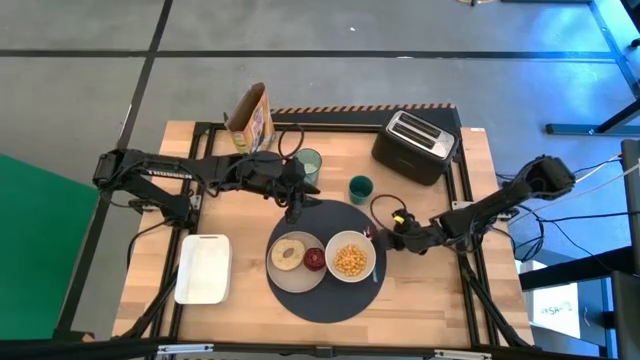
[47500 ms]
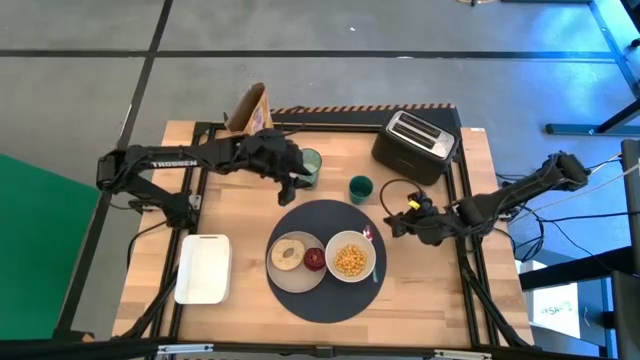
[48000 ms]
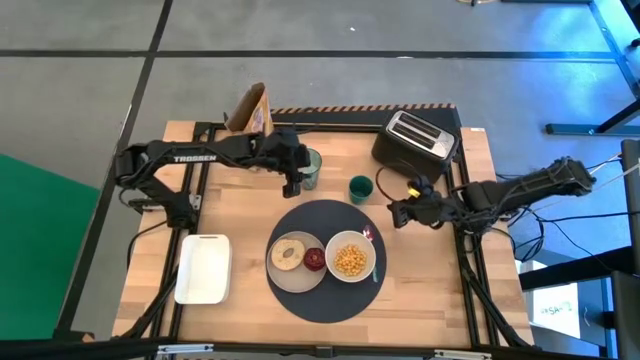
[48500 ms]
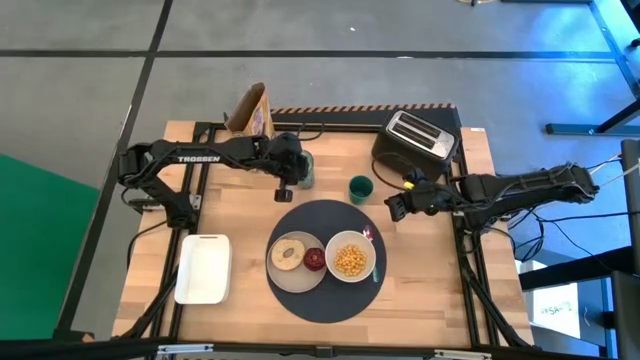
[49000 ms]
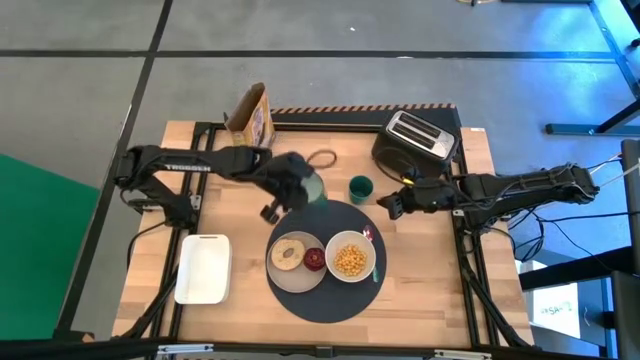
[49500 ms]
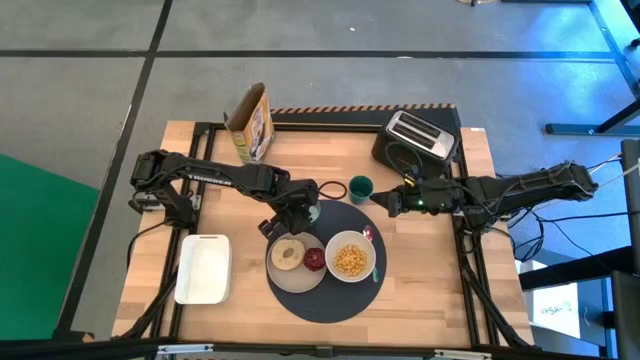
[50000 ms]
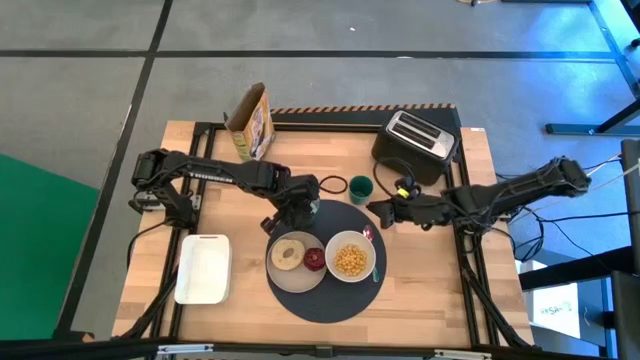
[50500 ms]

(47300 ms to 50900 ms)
Task: Arrange a breakfast setting
Put the blue cup on the top left of the table mat

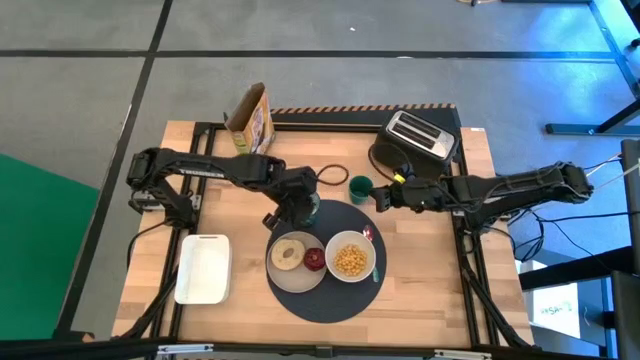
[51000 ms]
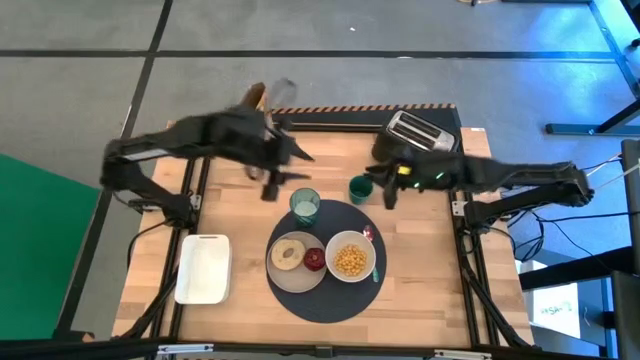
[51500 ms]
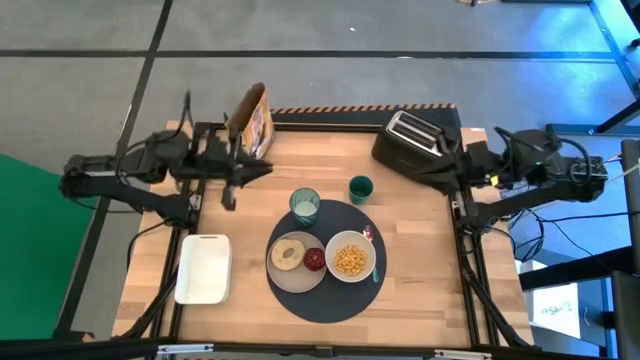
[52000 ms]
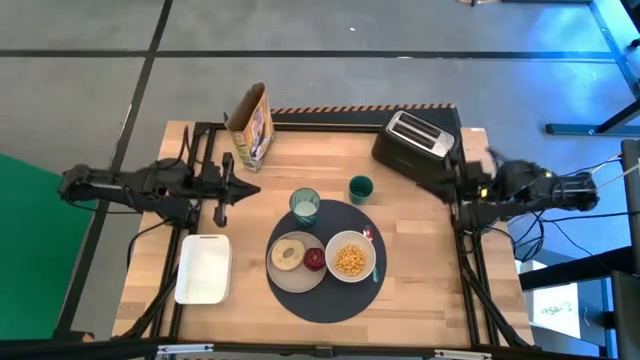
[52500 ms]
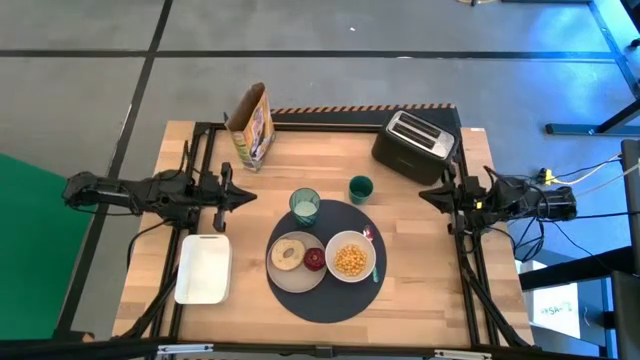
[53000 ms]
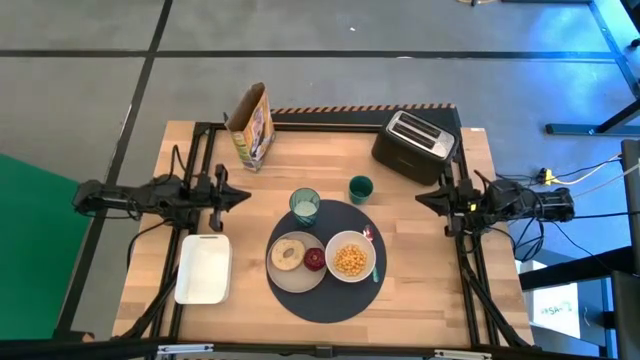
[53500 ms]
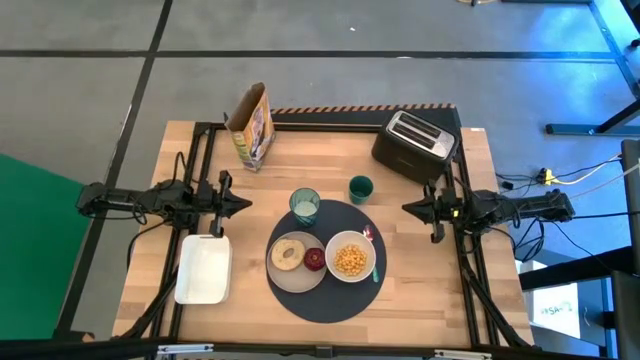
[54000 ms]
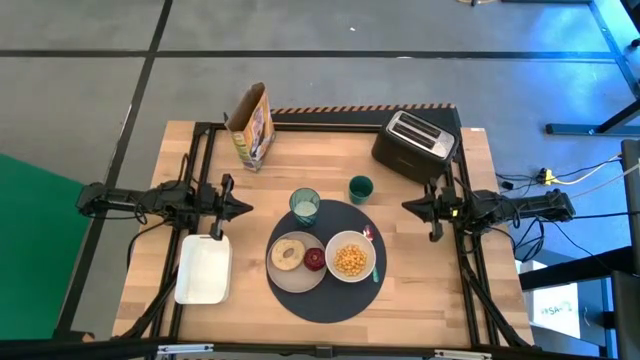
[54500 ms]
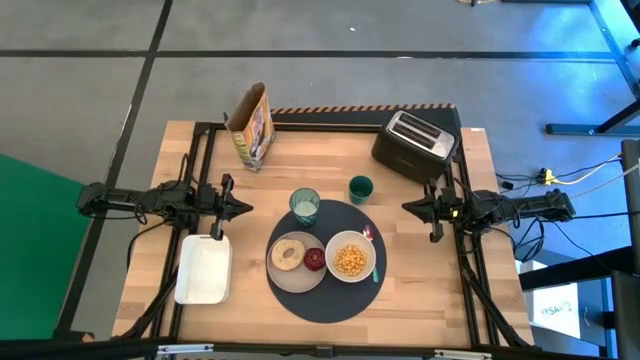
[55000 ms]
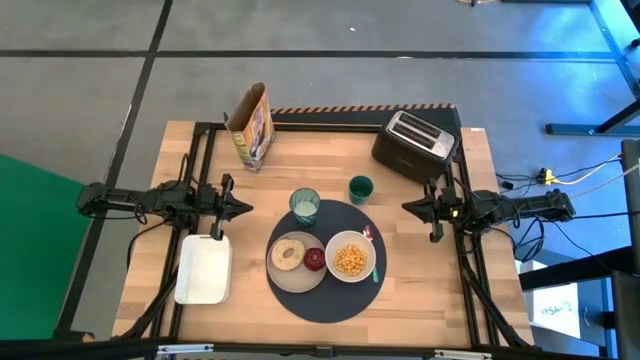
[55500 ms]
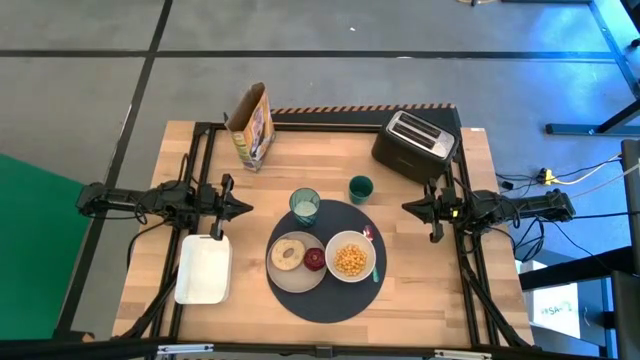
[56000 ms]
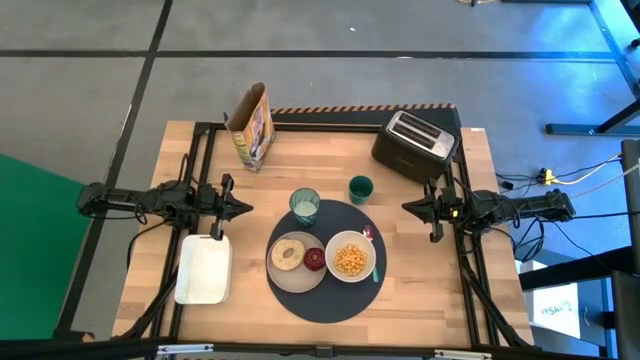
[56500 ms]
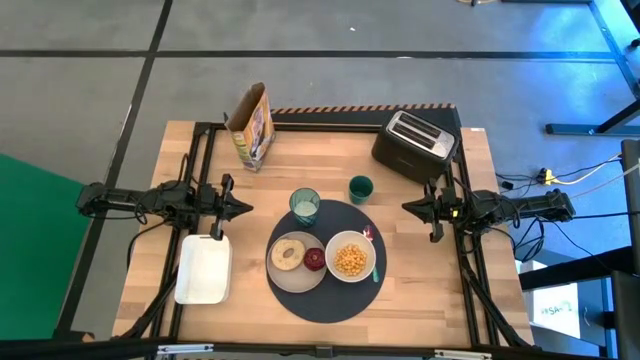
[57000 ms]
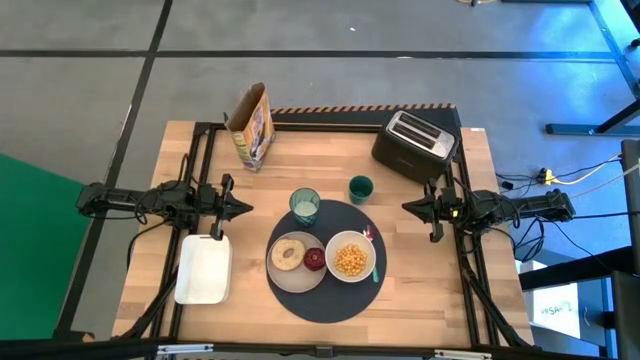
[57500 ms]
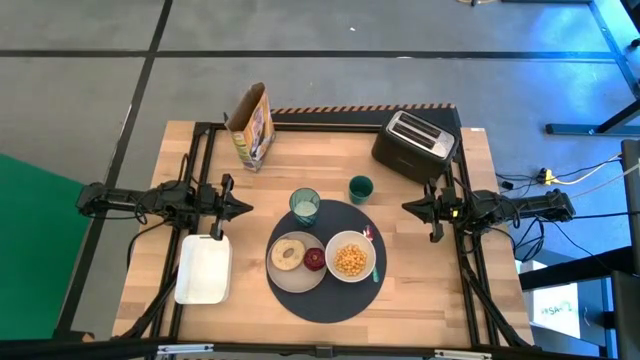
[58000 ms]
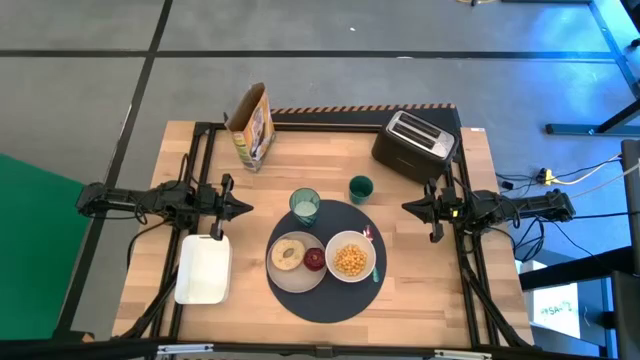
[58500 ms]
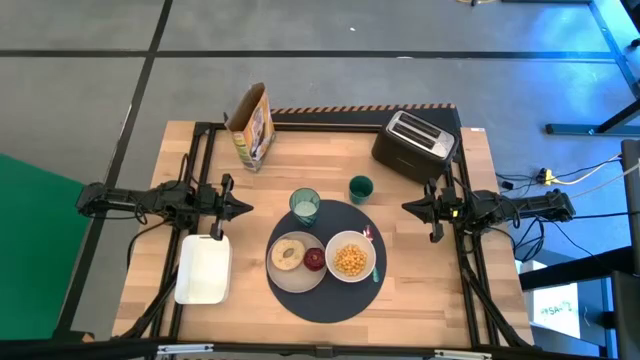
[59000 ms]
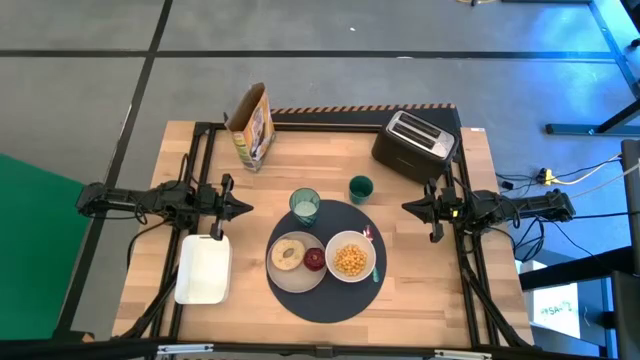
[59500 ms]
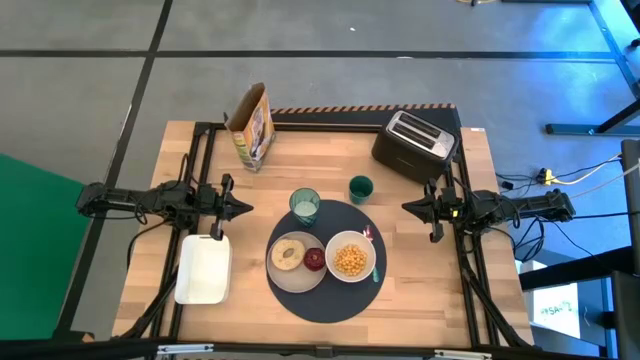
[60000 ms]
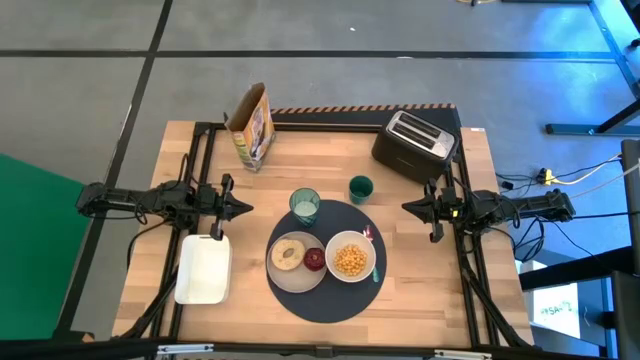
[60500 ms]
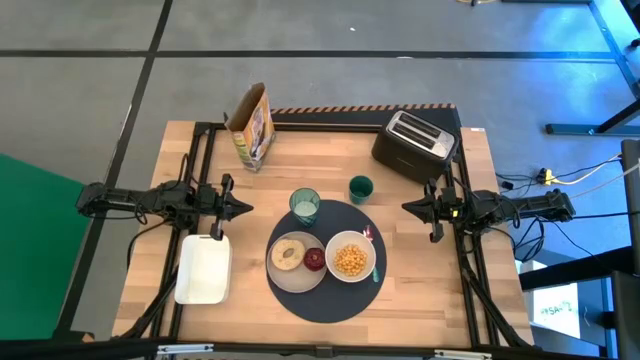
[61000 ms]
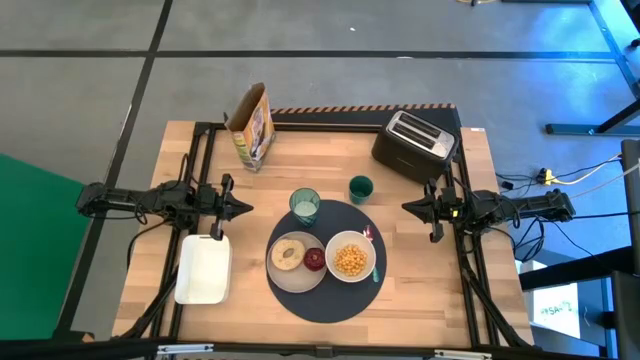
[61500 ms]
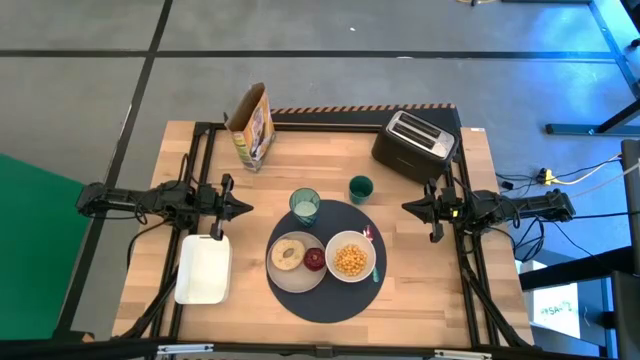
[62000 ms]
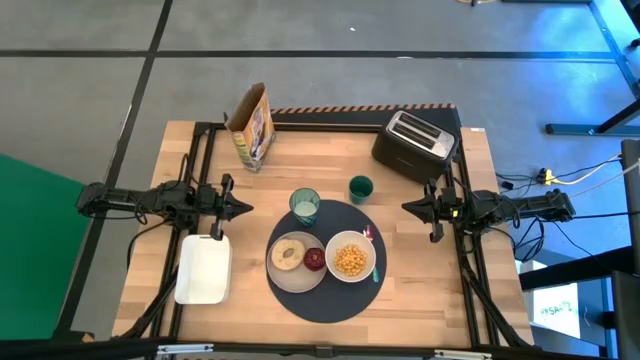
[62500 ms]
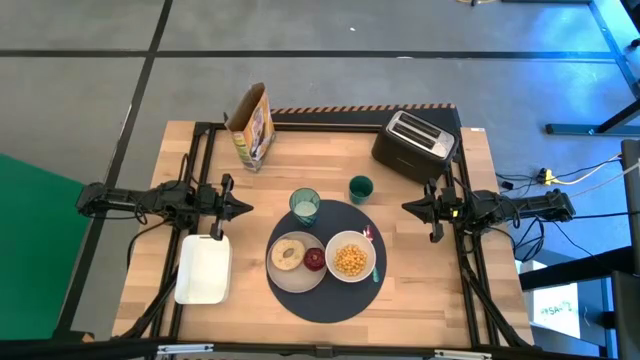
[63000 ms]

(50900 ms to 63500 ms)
Return to Home Position

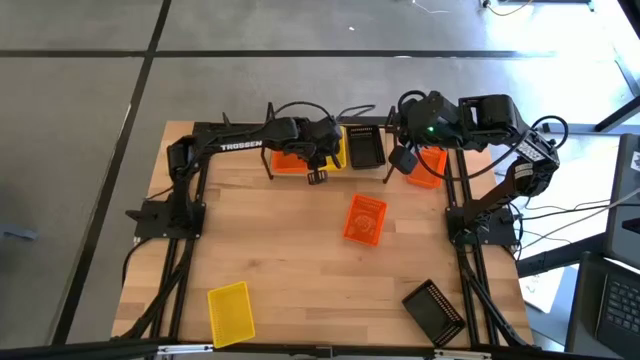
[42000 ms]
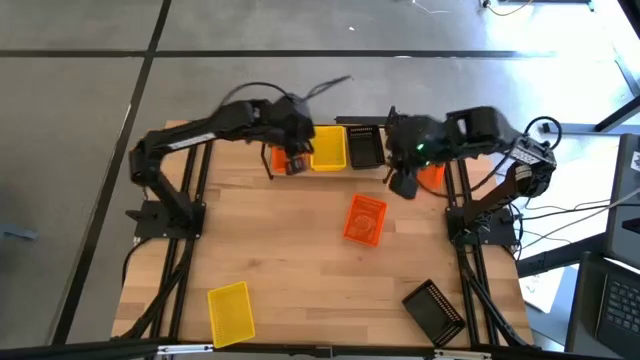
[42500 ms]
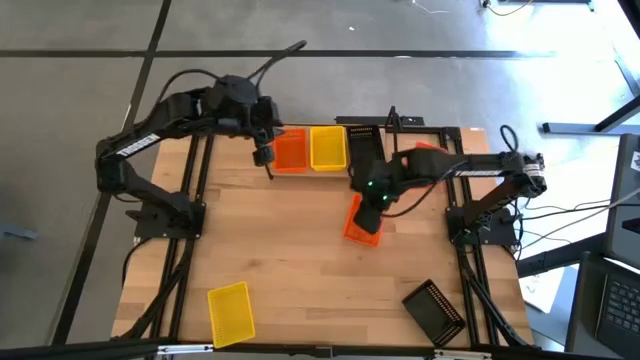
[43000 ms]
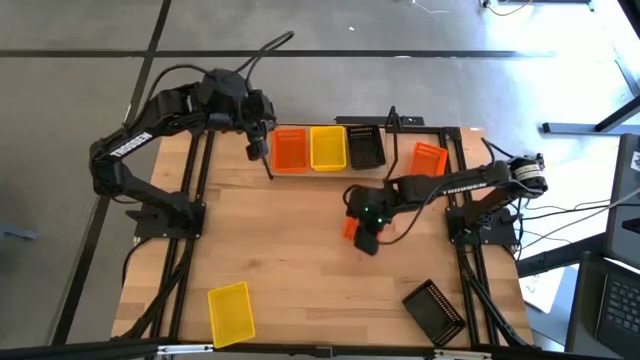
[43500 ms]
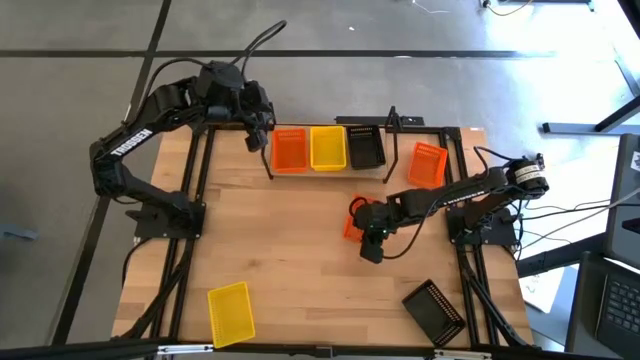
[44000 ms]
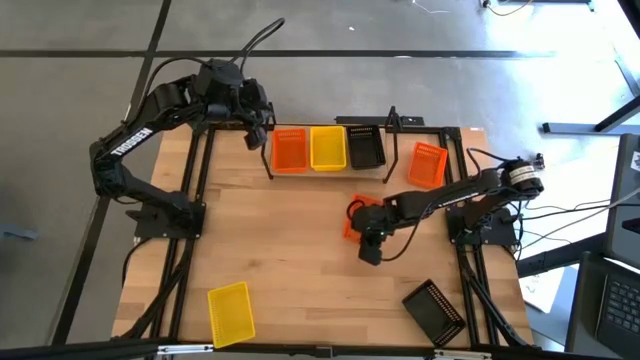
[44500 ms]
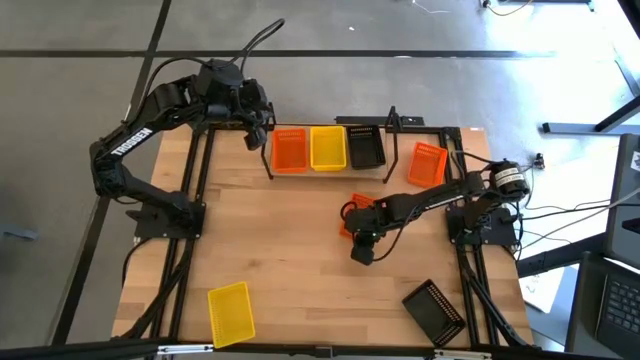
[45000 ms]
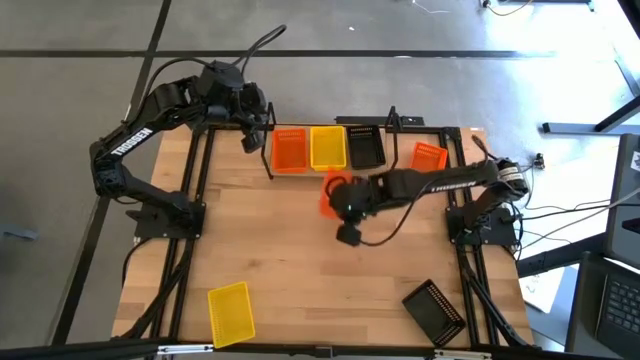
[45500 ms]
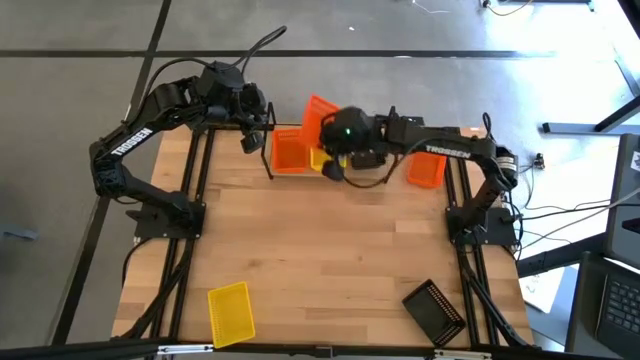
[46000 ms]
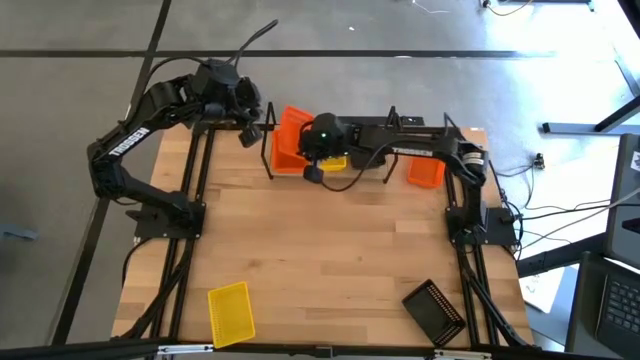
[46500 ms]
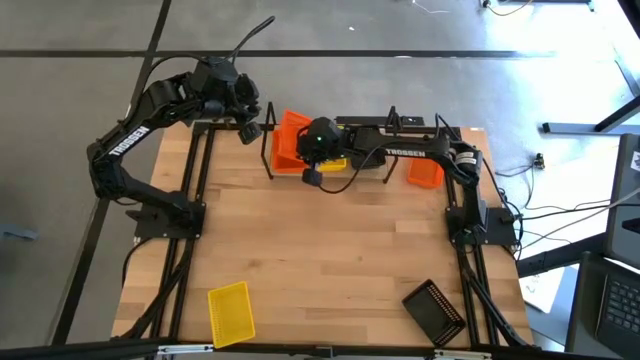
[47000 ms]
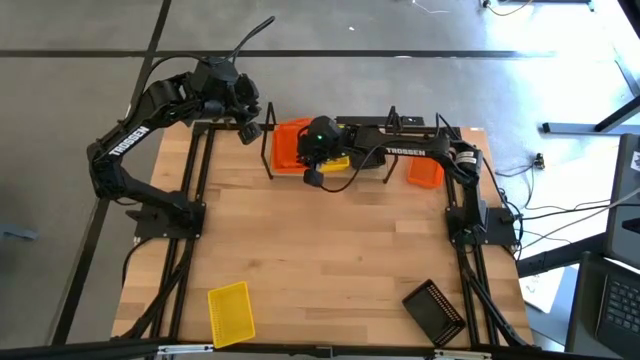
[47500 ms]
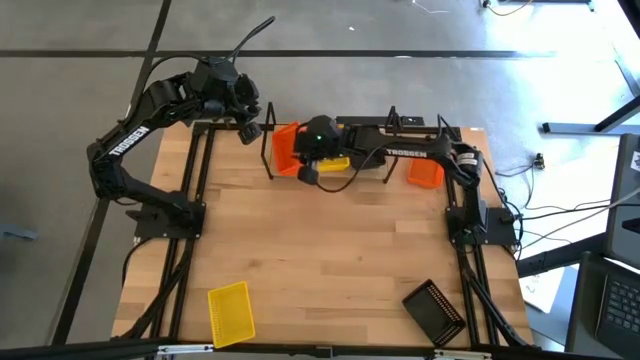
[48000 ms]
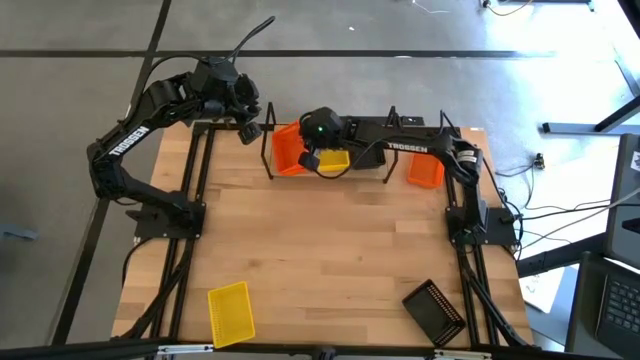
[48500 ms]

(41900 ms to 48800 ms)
Task: Stack baskets on shelf by color
Stack the bottom orange bin on the orange bin on the shelf
